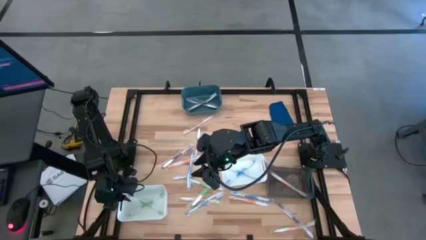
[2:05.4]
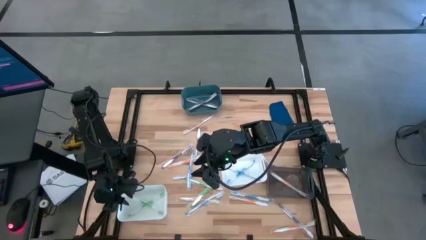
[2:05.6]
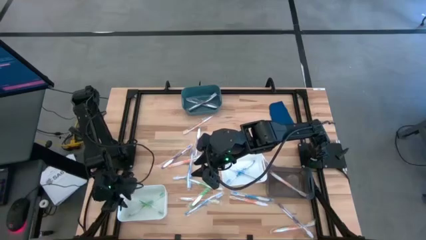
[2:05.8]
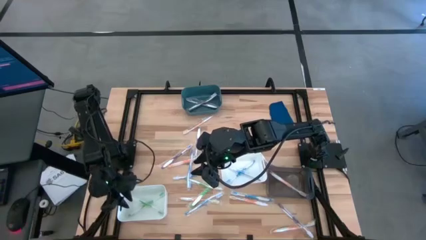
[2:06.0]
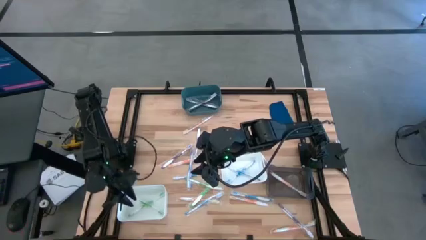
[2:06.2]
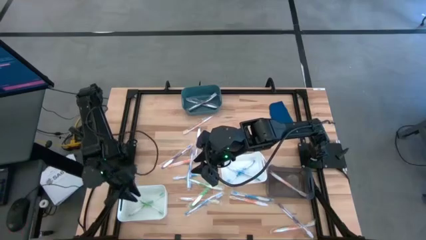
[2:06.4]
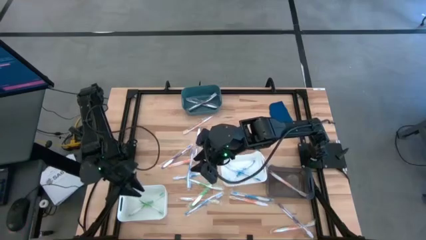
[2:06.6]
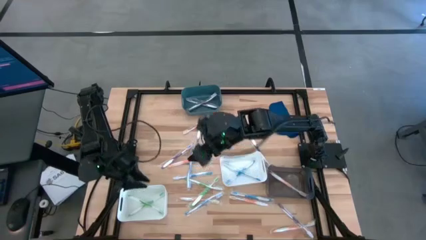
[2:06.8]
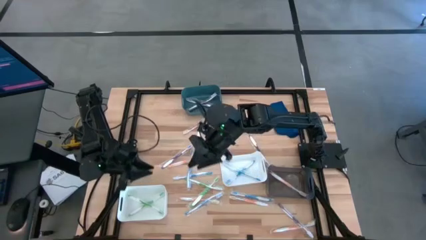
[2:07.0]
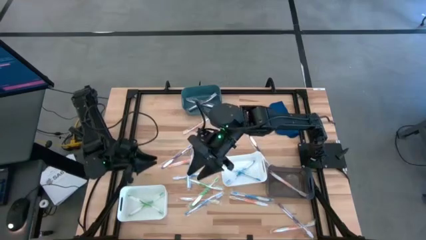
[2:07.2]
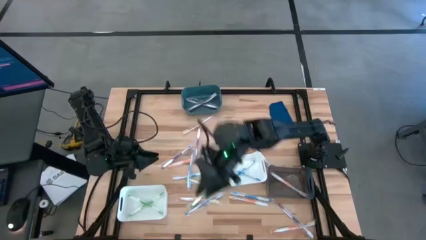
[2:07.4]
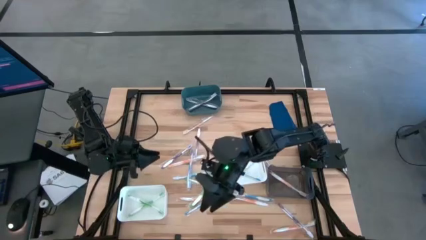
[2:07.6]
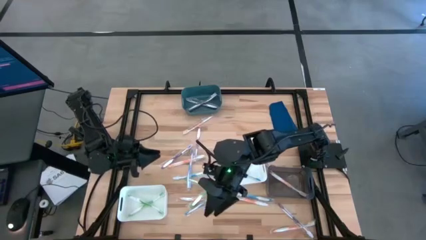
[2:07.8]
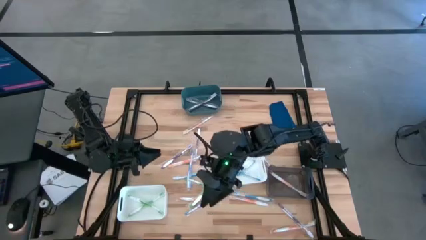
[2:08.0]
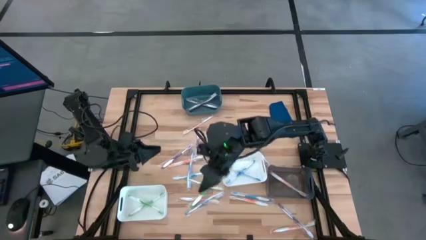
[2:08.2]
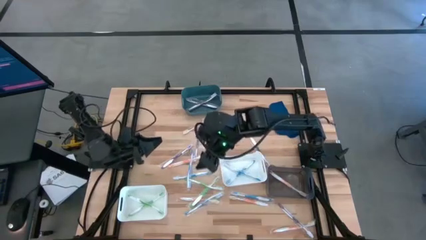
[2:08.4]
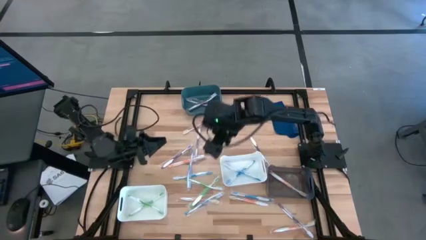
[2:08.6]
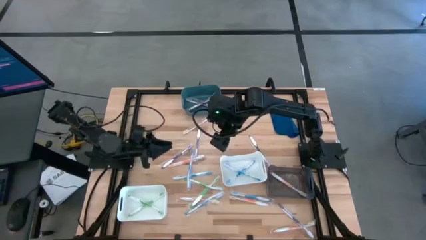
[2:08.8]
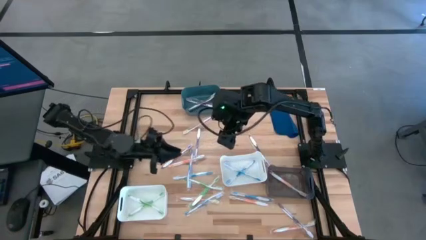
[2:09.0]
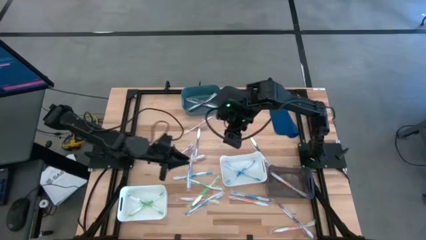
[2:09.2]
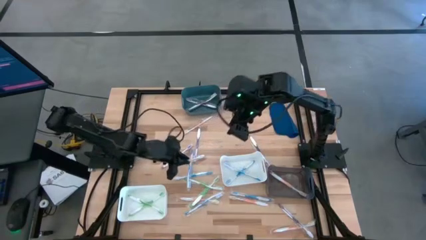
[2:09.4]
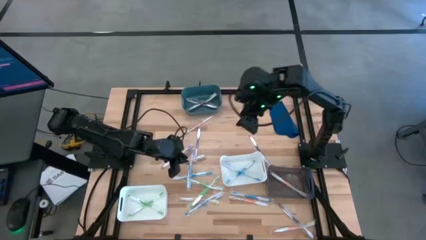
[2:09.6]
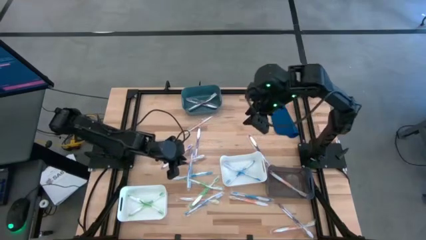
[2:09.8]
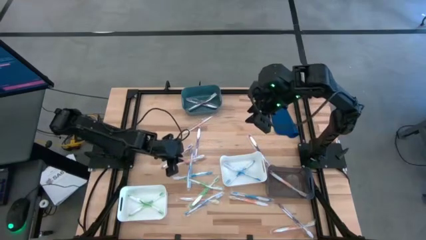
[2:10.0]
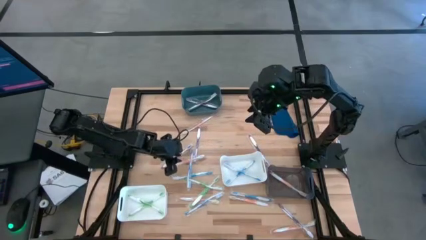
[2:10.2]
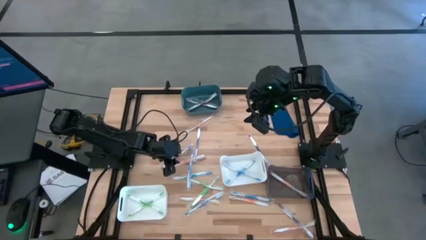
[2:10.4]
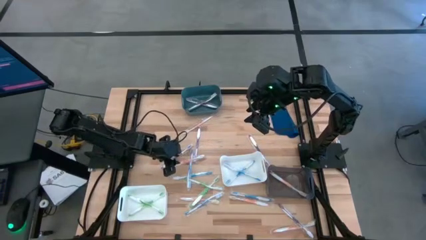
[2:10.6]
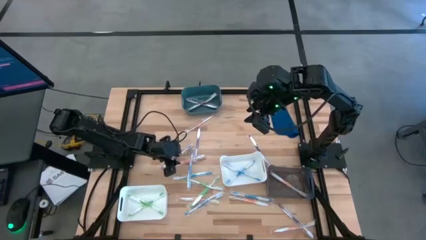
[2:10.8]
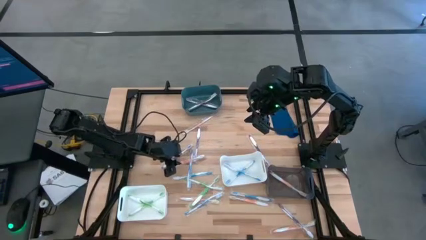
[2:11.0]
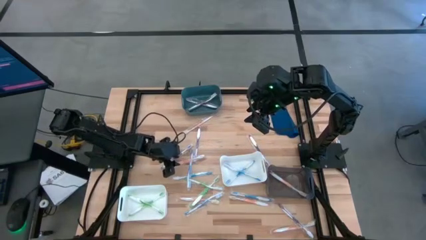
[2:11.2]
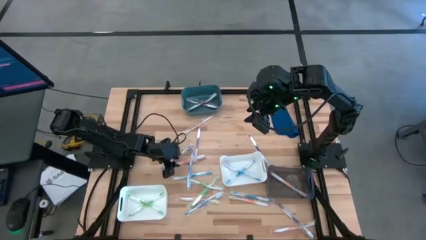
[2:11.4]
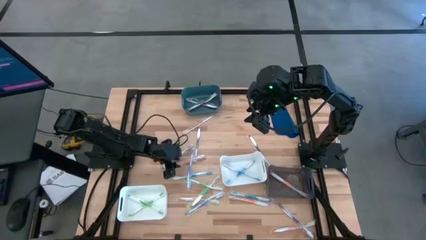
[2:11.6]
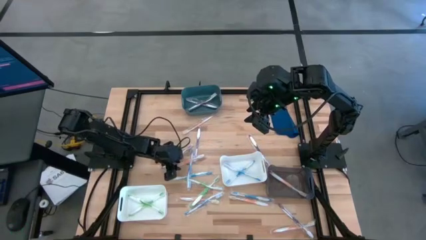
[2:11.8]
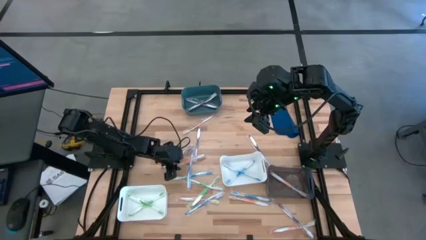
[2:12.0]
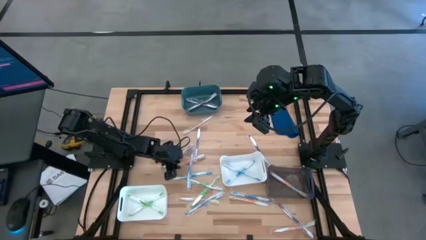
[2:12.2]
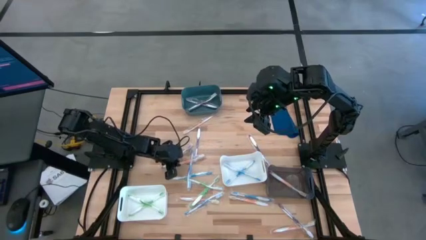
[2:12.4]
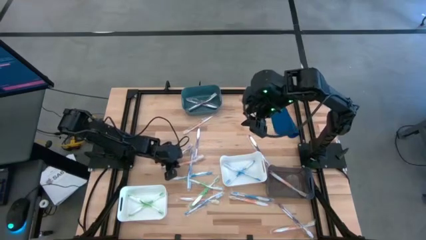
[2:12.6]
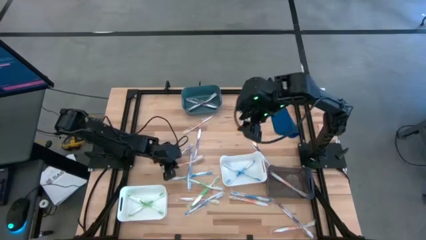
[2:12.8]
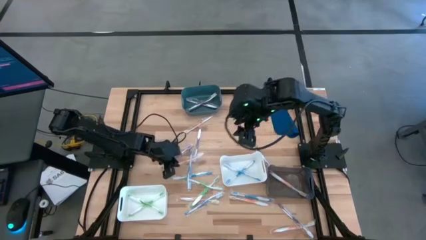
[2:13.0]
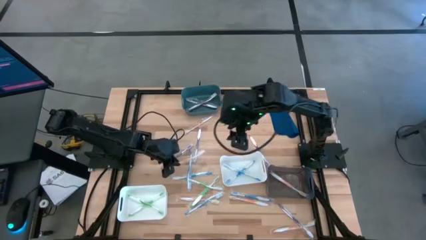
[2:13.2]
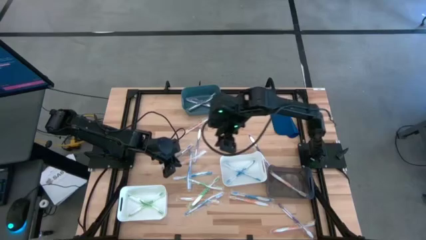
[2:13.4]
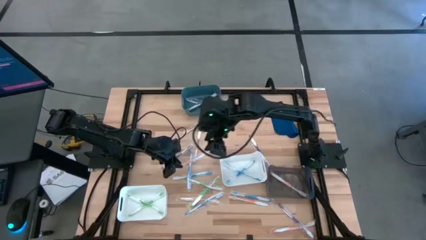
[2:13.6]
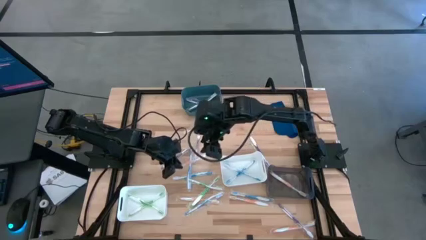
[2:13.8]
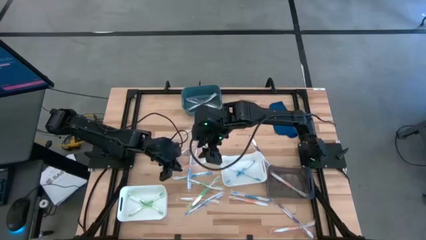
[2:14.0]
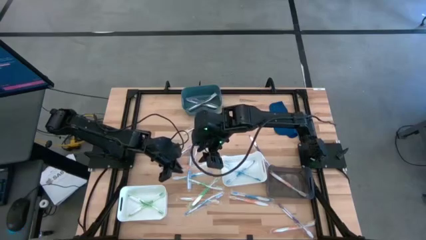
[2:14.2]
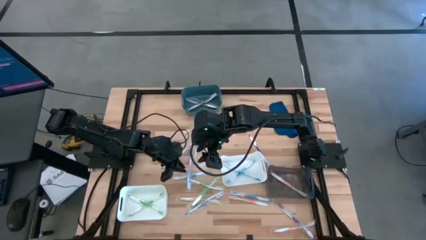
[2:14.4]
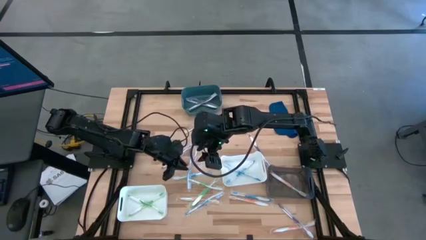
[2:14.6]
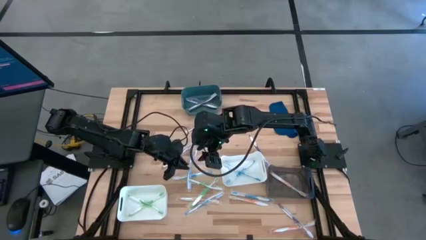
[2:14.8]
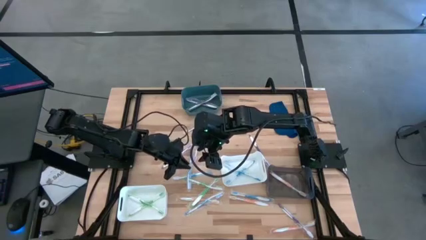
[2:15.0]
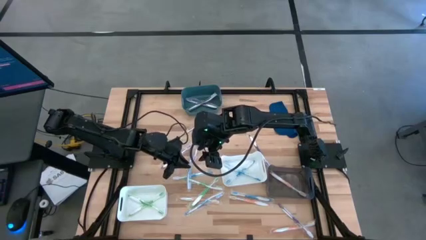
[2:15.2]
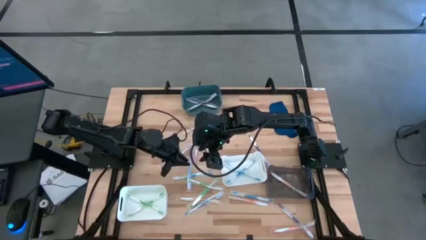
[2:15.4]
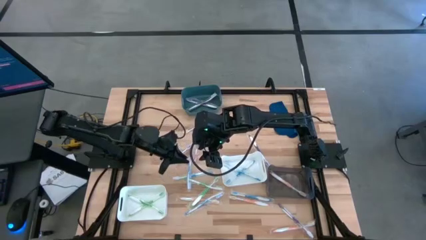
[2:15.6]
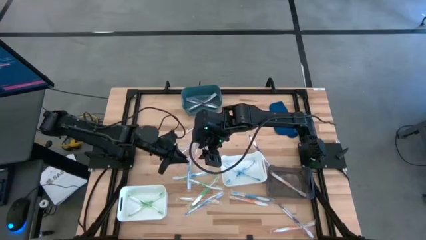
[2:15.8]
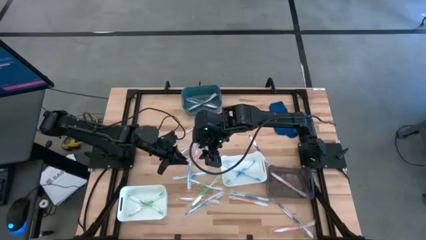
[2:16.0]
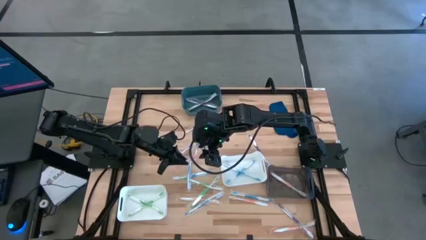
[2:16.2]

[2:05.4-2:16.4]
Task: Pick & Place Toothbrushes
Put the orange toothbrush into the black bin

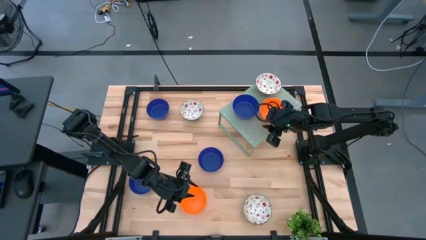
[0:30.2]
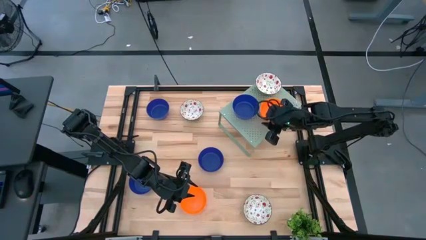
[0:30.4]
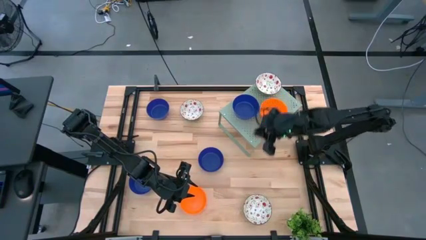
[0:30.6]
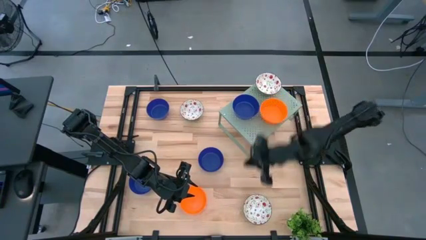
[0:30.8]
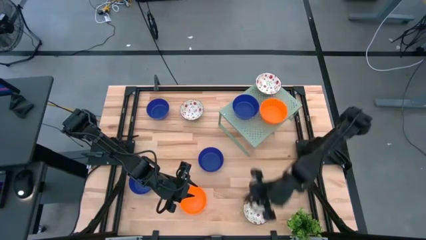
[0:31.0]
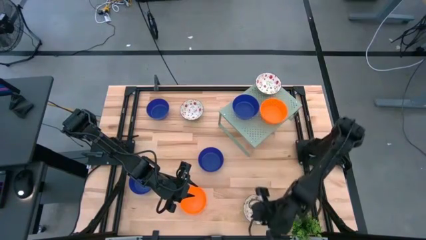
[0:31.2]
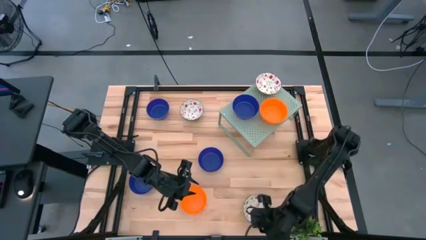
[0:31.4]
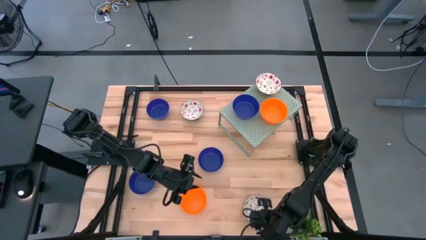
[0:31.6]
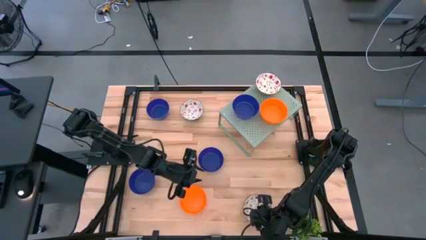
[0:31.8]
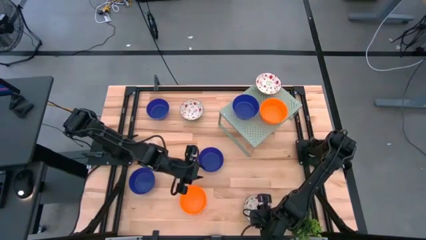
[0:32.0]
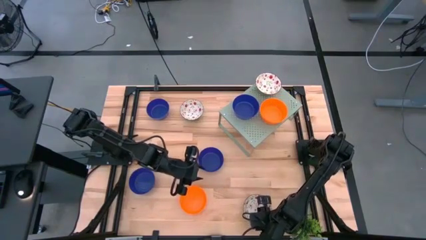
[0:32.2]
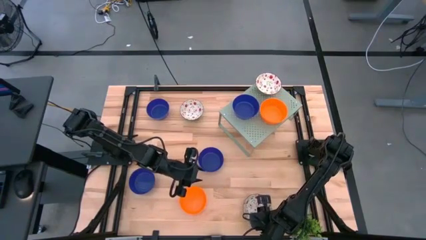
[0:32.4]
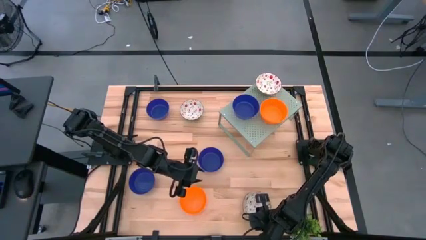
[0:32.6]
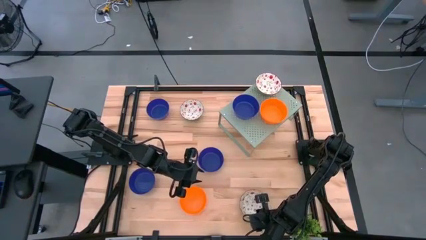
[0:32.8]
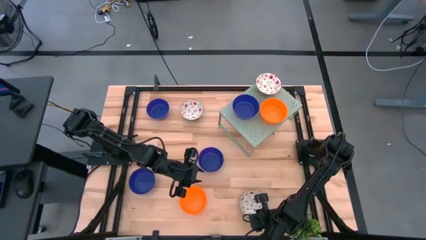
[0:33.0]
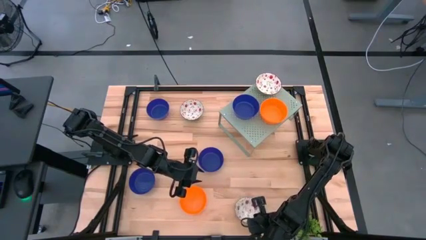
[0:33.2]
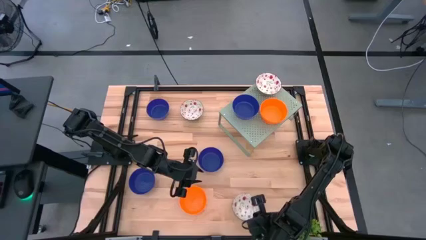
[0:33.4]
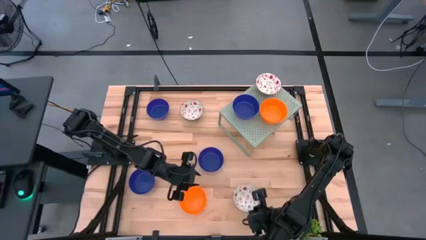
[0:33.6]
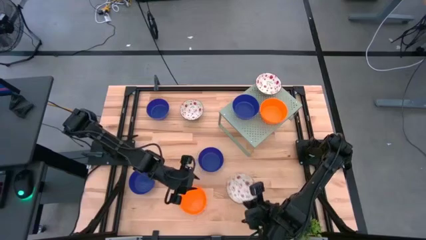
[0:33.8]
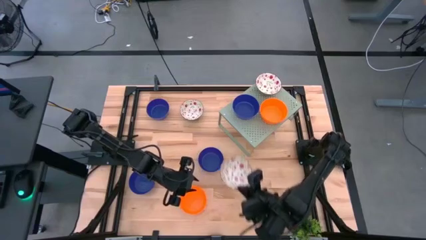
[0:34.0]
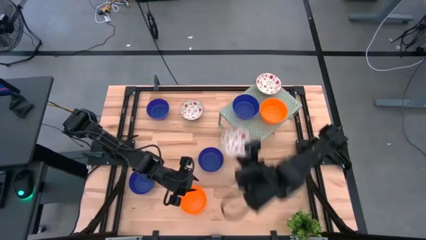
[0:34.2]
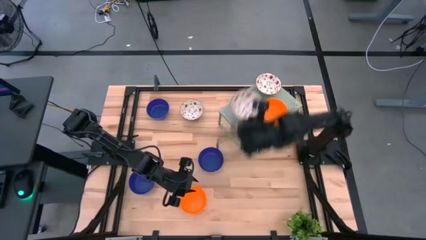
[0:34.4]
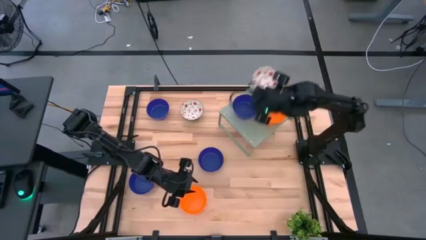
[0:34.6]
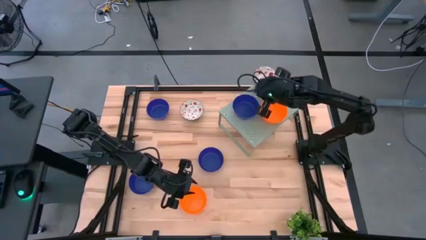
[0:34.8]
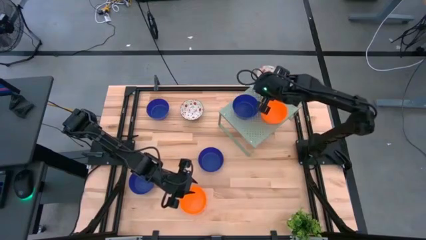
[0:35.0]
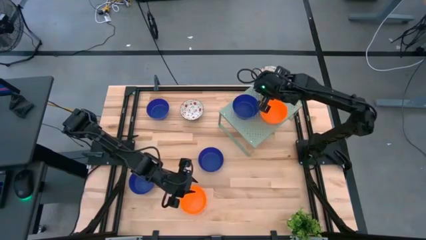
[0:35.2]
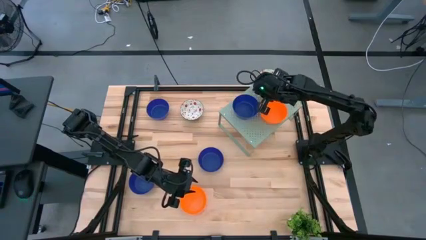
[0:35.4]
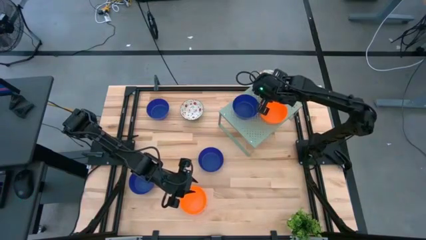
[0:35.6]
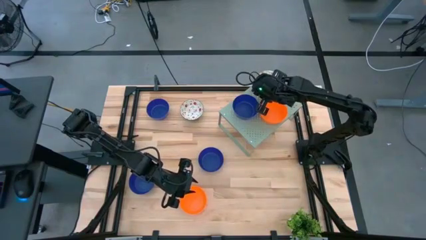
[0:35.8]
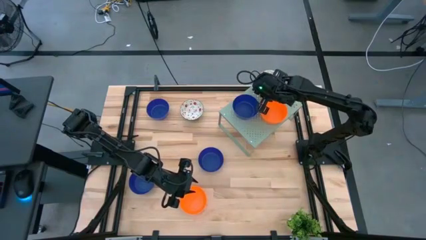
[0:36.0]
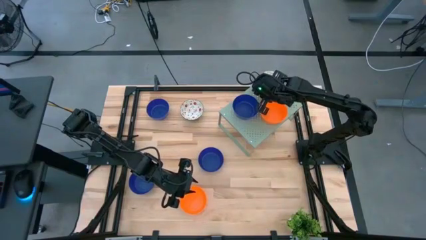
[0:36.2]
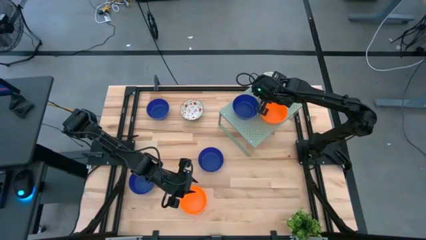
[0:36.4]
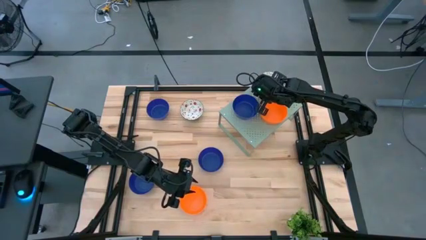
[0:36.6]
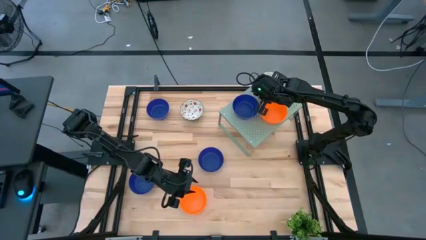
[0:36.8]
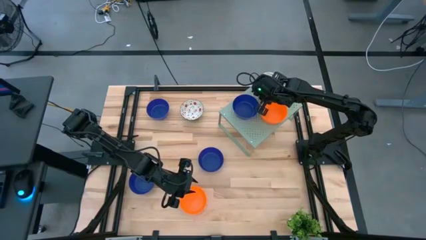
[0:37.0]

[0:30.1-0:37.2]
Task: Pick & Place Mini bowls
Stack the white patterned bowl on the white patterned bowl on the shelf
